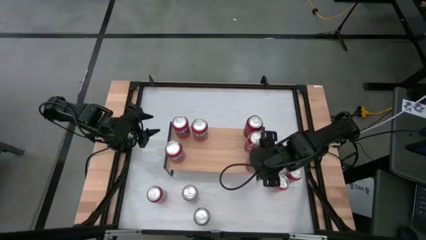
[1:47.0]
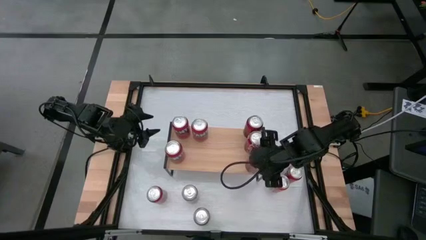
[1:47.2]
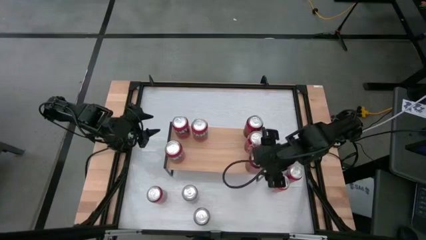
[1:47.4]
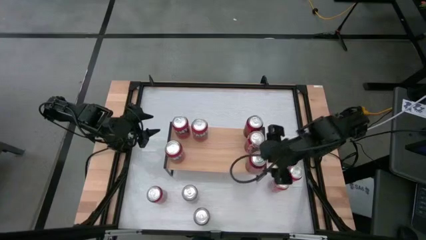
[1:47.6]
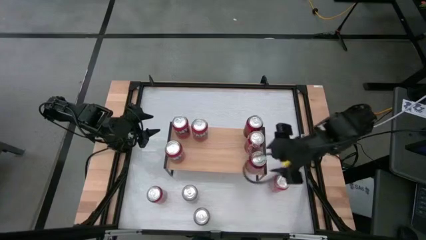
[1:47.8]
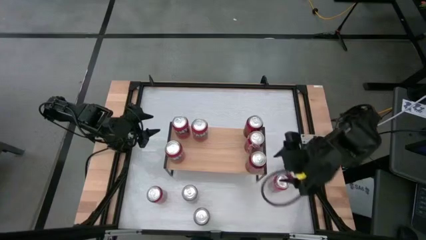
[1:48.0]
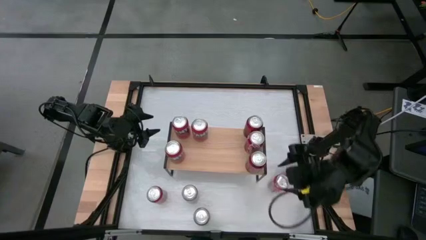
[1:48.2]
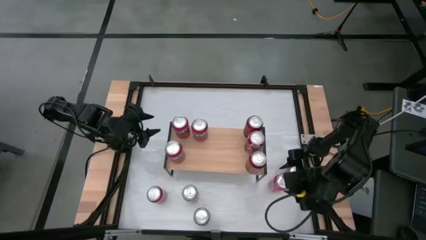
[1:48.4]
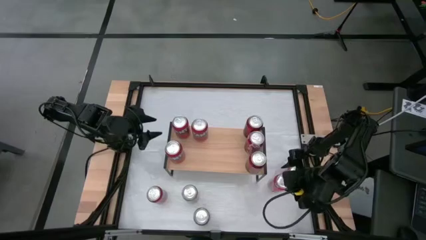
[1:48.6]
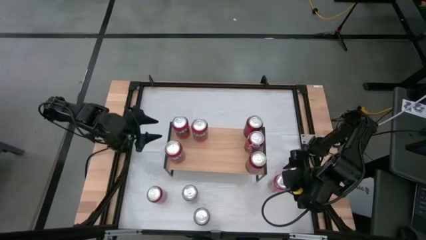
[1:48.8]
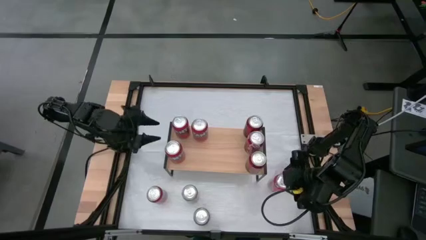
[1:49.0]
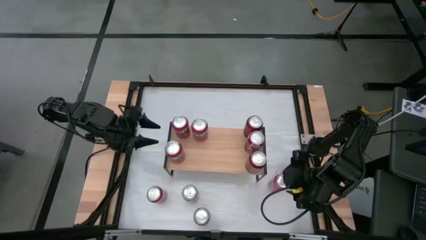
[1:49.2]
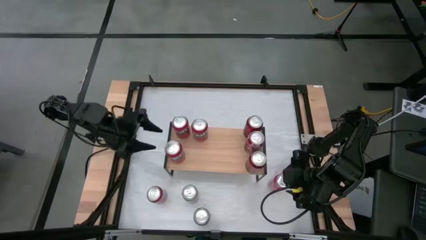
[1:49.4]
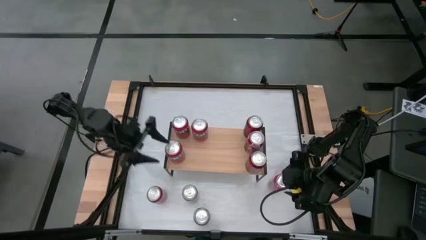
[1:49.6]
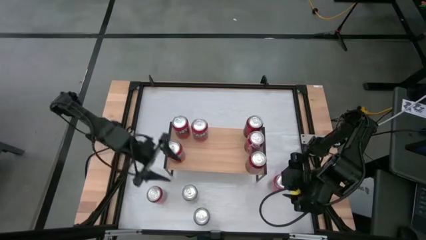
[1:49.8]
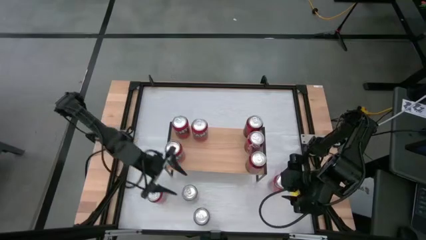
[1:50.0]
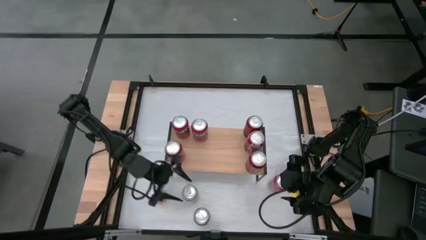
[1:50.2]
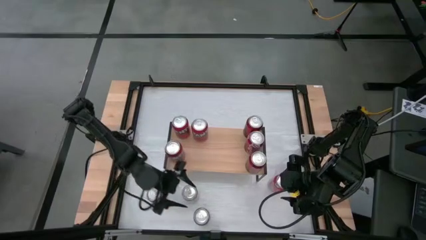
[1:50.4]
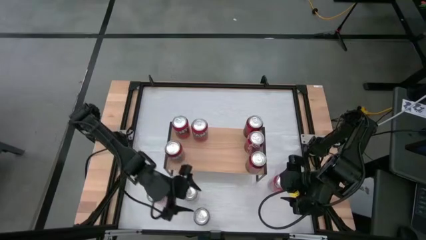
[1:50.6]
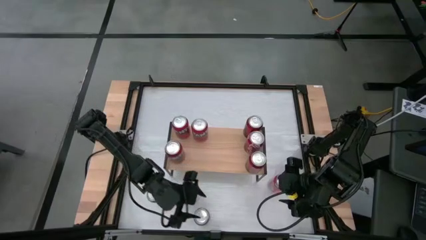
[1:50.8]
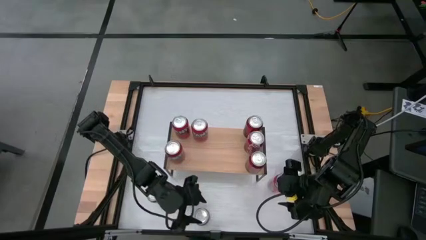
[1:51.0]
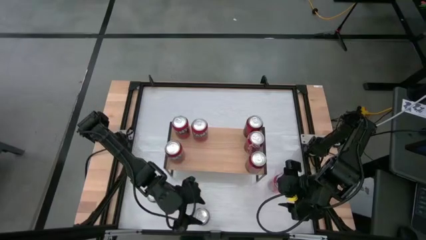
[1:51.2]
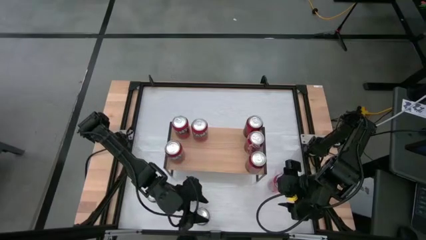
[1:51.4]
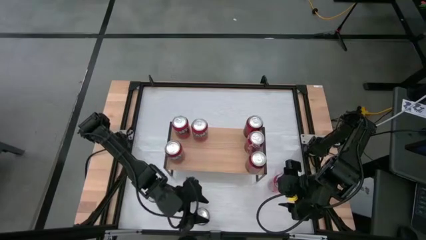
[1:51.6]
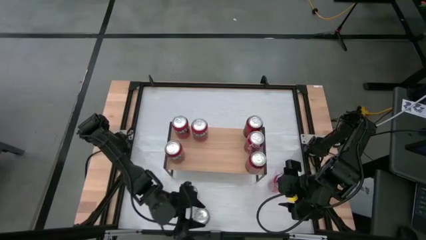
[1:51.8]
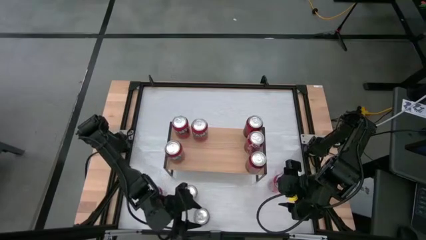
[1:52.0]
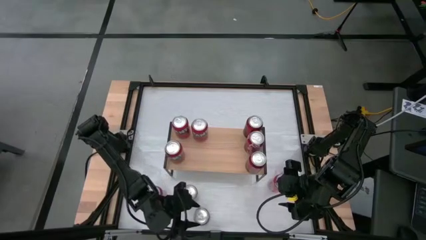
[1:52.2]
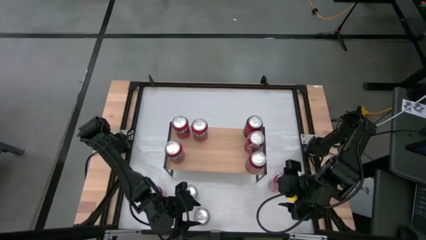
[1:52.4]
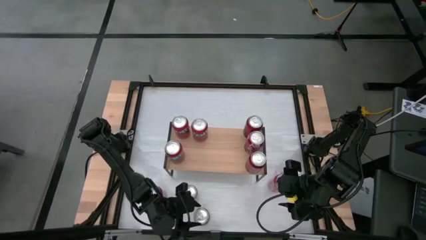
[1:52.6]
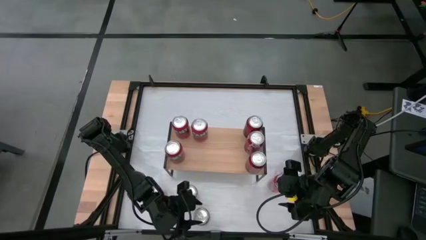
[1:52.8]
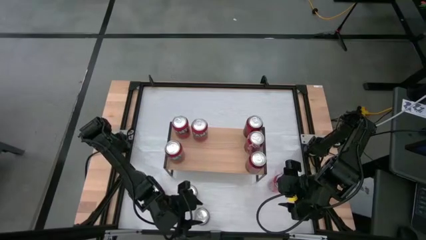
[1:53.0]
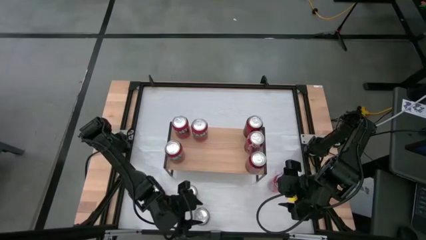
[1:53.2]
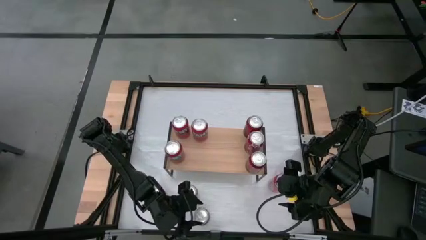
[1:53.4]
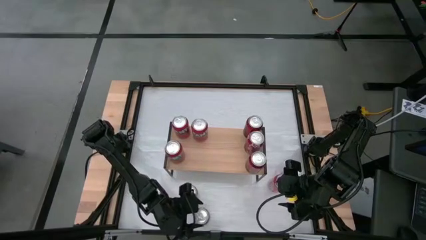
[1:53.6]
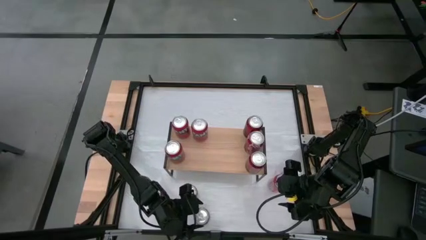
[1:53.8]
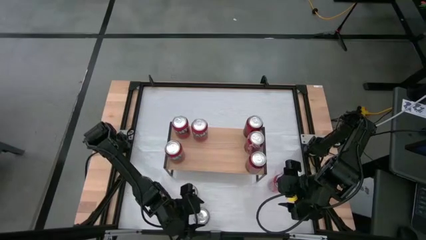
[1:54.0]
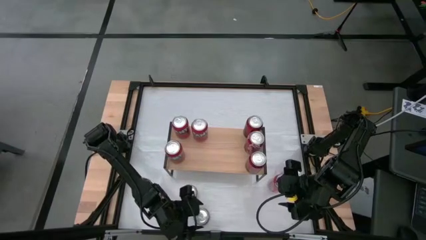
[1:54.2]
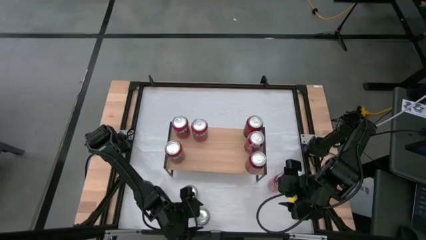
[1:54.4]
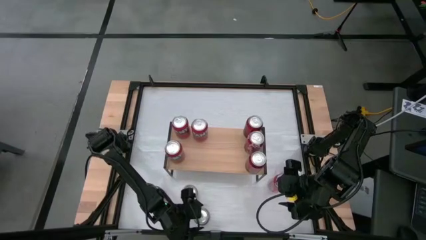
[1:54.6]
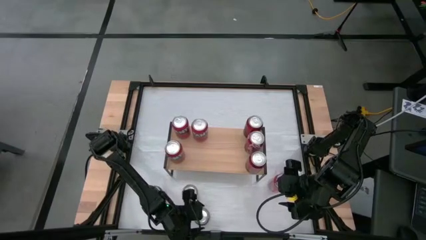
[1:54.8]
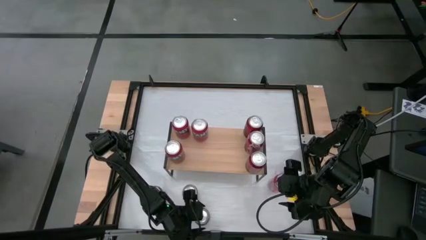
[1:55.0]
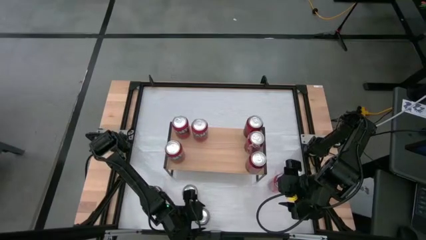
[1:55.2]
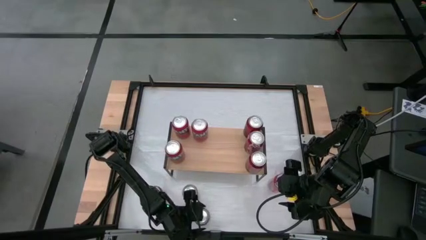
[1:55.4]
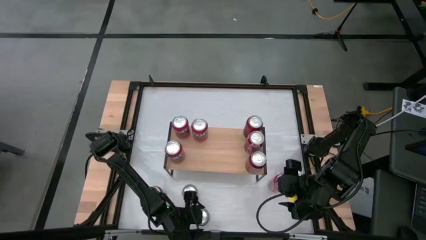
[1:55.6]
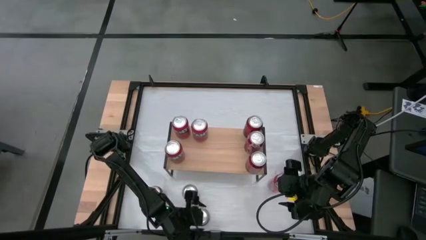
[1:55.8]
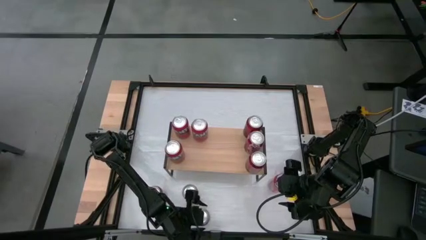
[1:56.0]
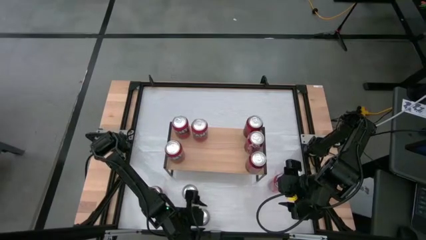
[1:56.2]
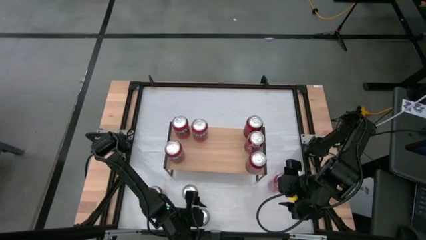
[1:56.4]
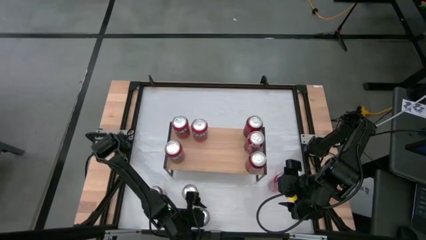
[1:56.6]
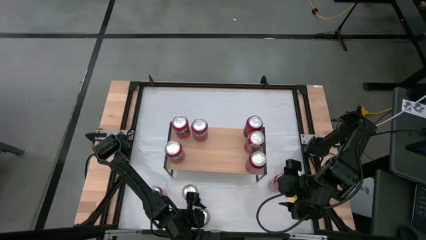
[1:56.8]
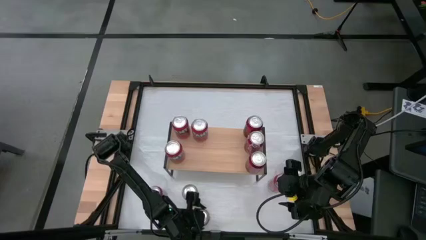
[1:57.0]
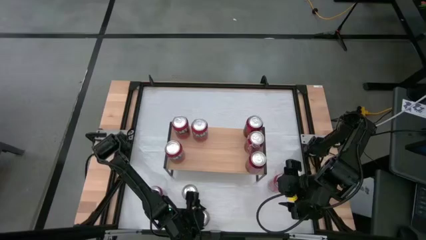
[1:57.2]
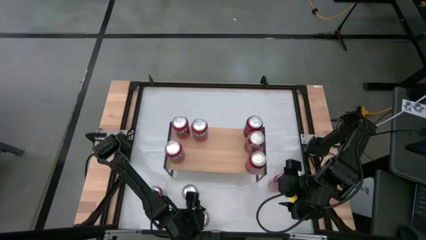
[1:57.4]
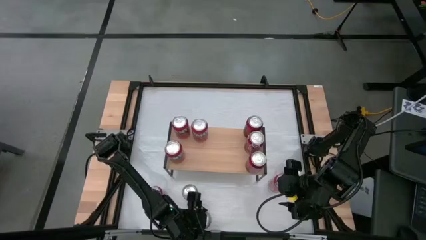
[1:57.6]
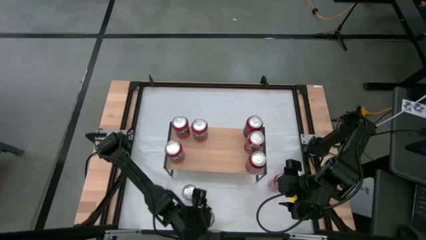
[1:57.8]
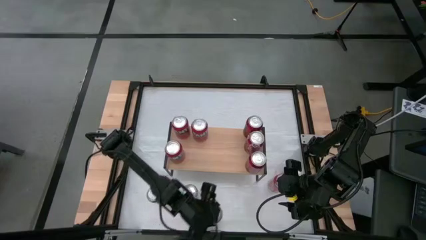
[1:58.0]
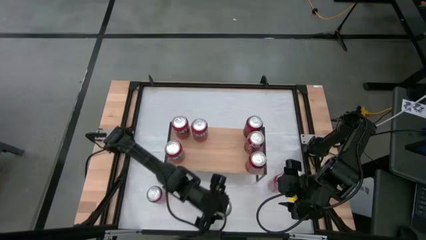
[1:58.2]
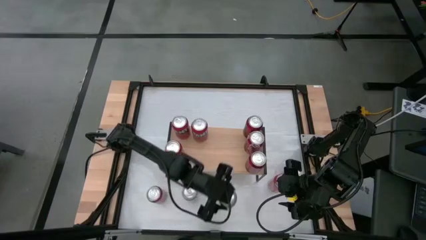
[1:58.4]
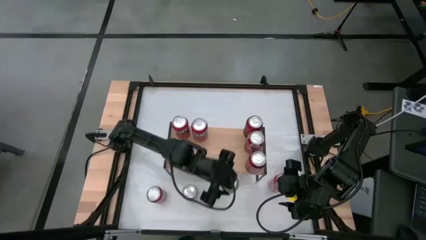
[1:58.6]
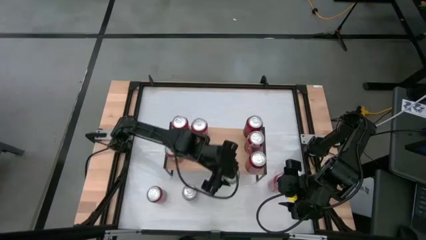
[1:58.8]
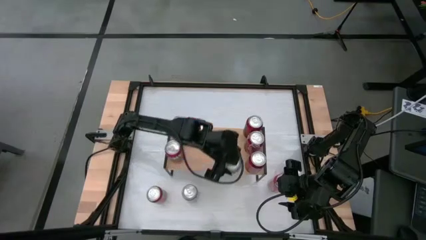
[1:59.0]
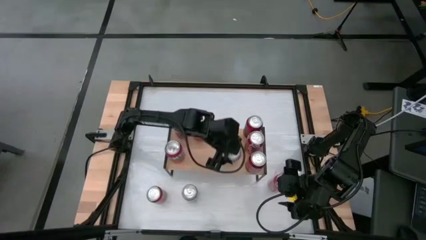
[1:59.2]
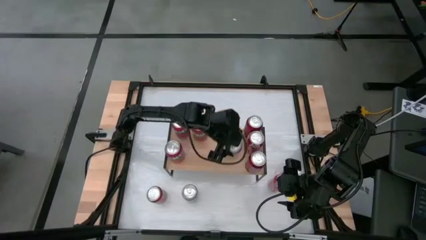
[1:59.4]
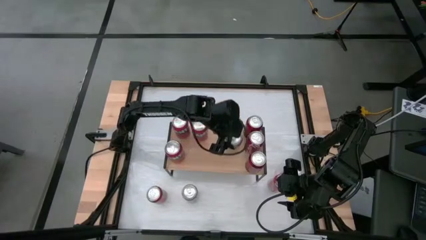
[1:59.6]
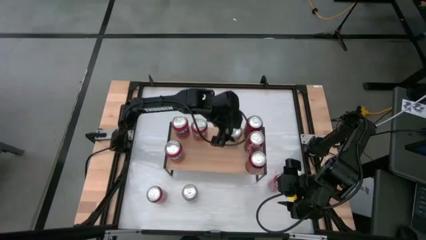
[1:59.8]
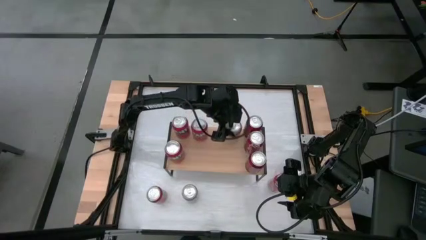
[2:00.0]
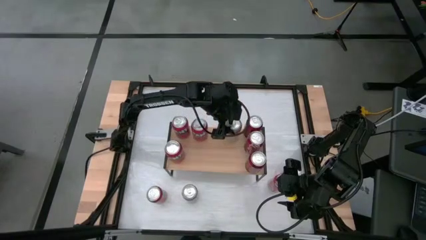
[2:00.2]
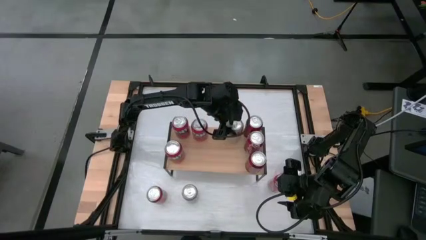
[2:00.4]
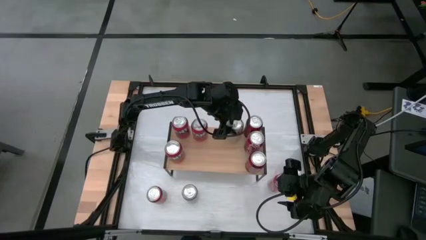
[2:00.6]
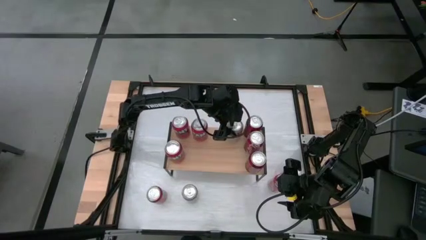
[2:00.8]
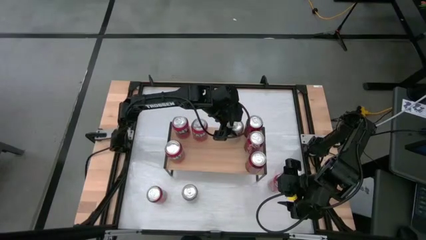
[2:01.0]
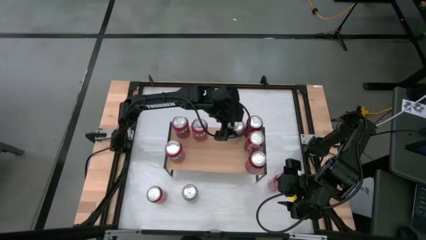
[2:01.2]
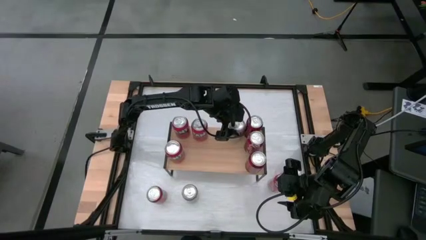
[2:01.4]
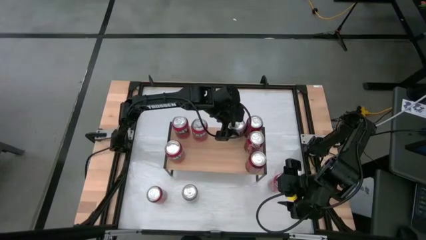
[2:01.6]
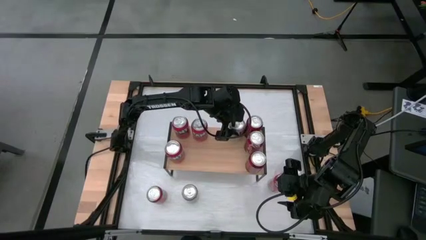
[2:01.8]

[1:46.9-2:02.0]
Task: Place canned beverage on shelf
Put the silver soda can on the shelf
